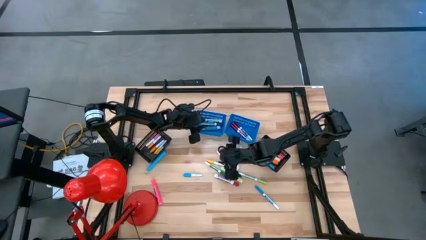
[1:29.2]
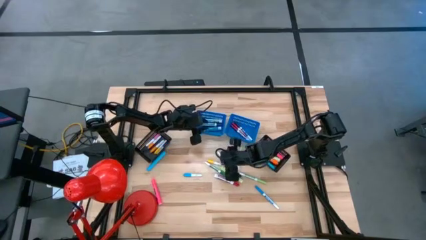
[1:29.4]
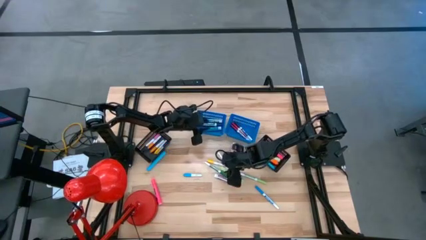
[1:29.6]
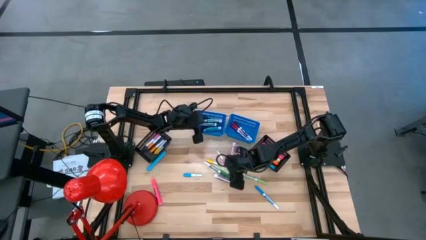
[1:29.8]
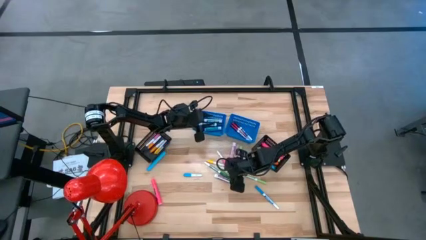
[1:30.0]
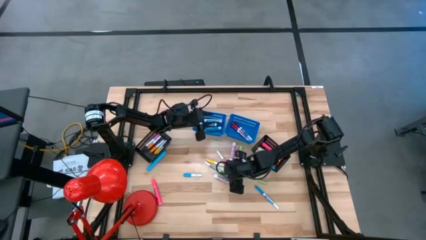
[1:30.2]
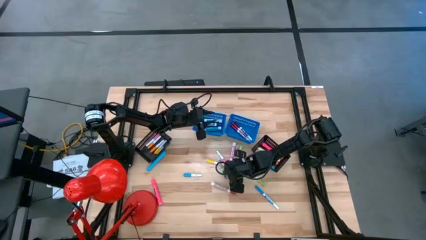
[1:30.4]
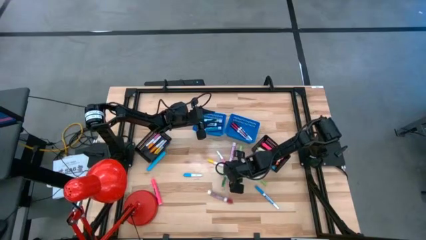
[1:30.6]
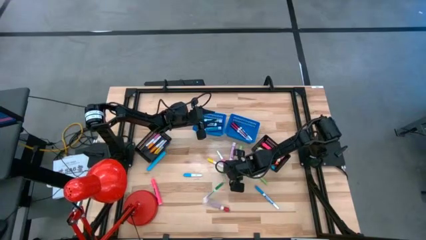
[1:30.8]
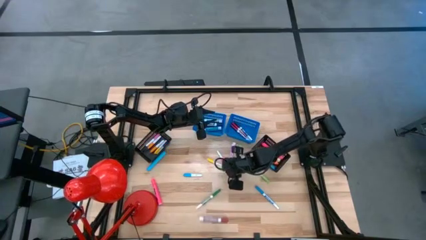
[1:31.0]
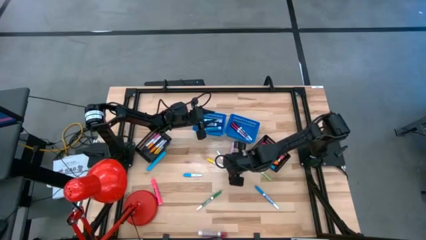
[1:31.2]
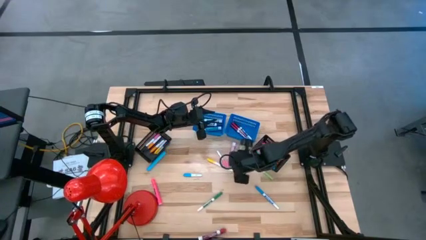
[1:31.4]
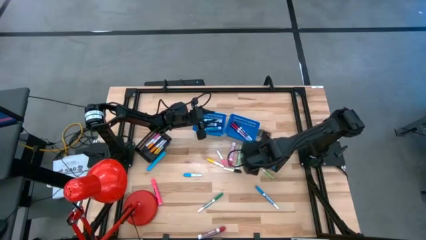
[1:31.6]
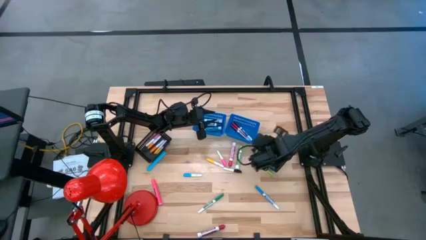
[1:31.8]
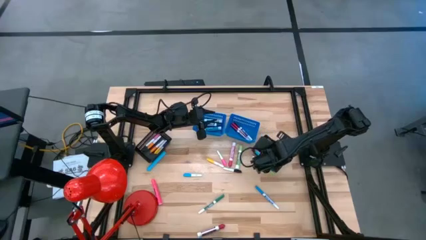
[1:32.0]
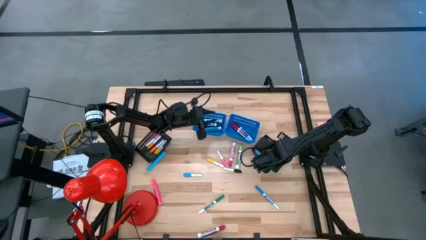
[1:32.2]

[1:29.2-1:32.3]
Task: Pick & Place Markers
Put the light green highlighter marker into the right black bin

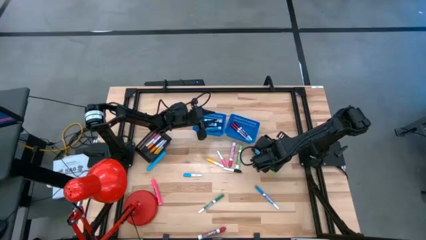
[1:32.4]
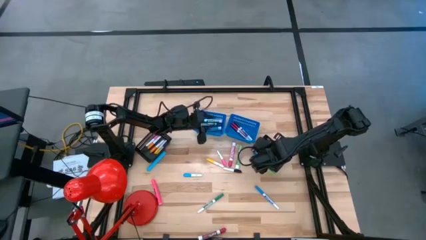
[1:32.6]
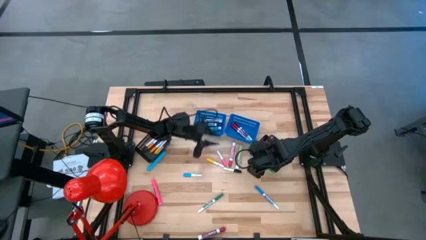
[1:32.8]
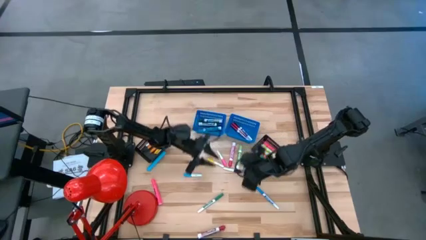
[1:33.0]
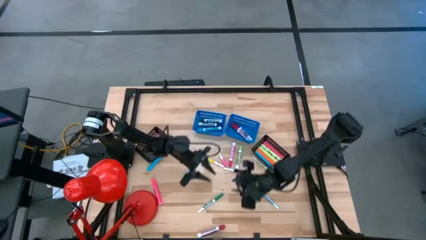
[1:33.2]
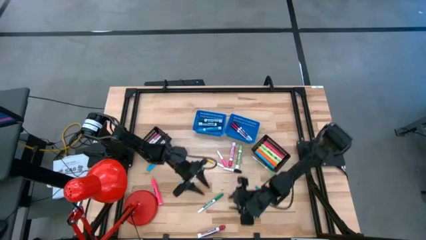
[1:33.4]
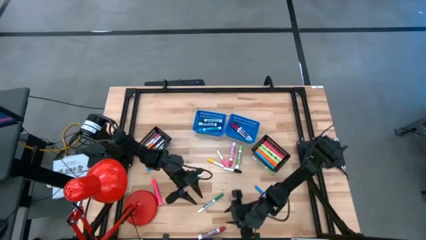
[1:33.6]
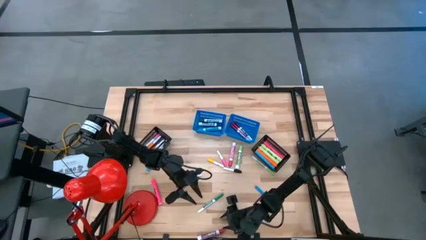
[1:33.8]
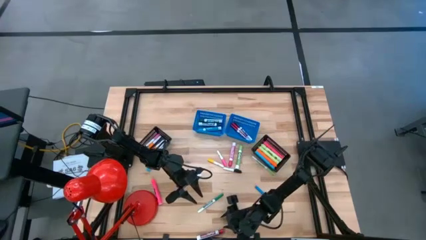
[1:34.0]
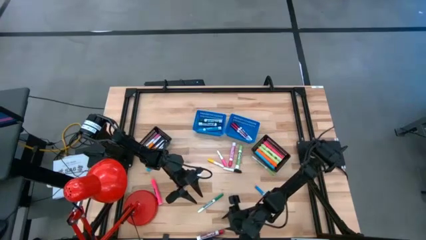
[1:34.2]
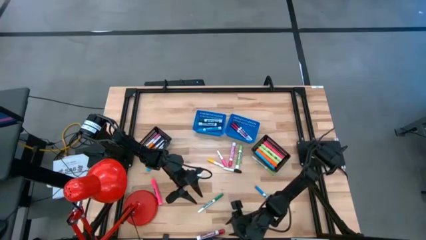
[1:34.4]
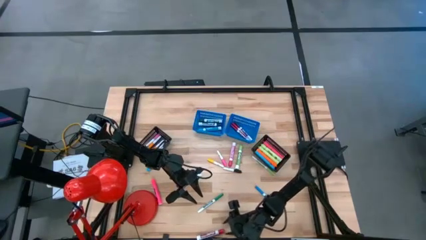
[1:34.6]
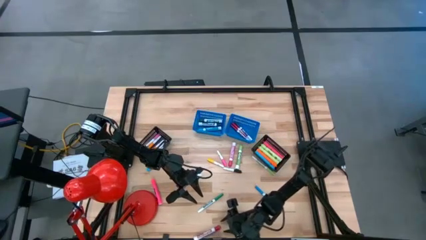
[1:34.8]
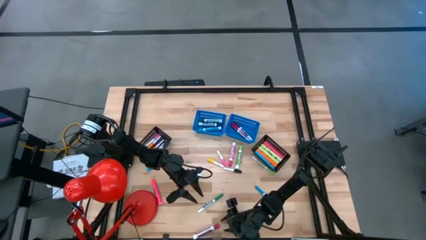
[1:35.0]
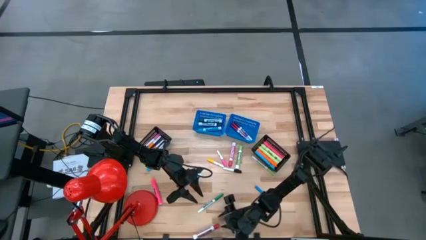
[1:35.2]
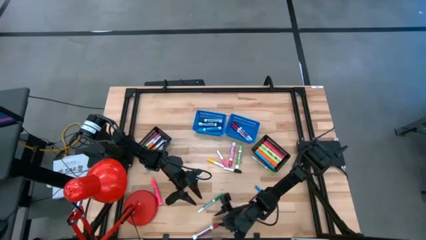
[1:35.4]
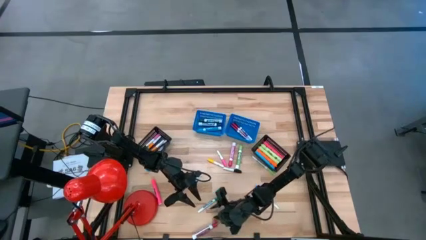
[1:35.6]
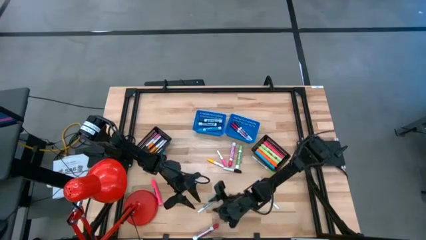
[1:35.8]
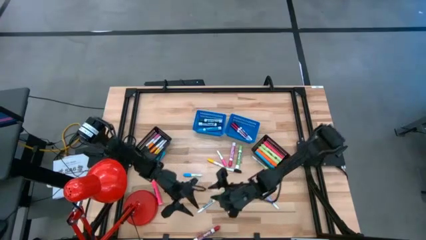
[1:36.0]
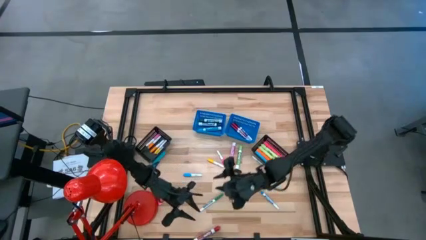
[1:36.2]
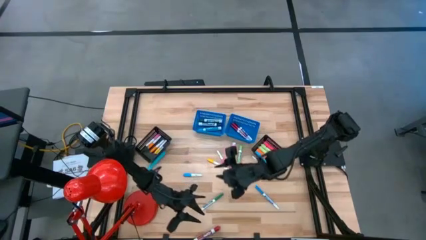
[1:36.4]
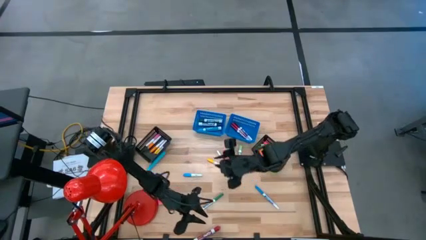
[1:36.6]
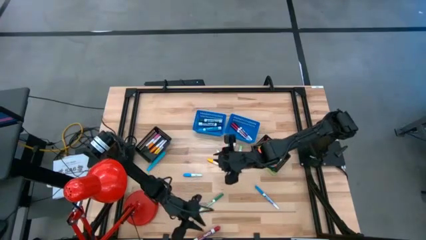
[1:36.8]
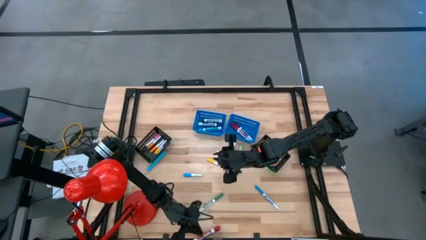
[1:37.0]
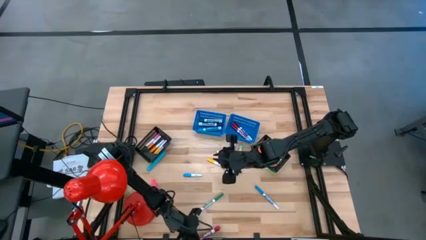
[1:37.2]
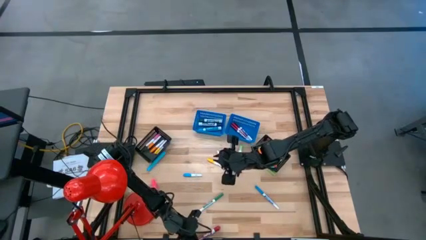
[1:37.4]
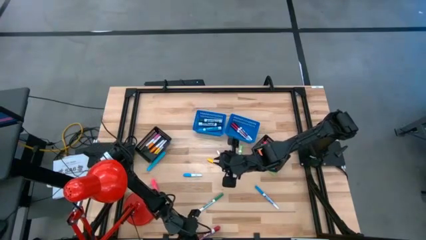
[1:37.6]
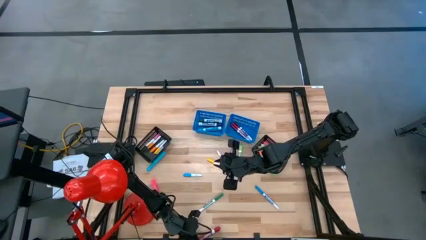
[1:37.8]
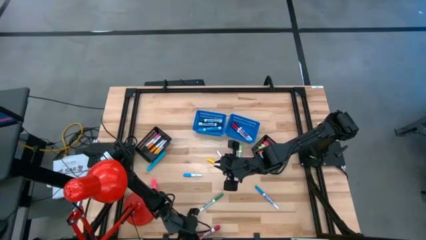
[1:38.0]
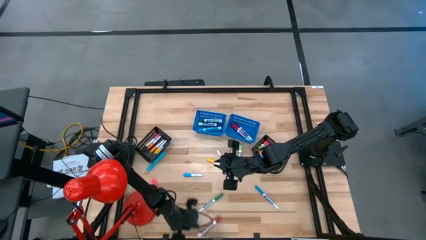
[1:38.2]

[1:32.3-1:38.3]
Put the red solvent marker into the left blue bin

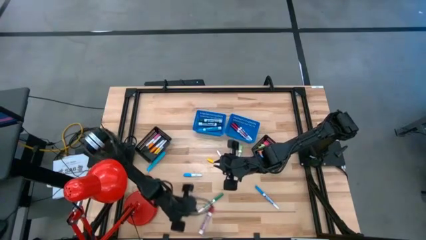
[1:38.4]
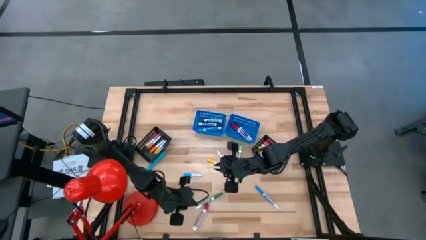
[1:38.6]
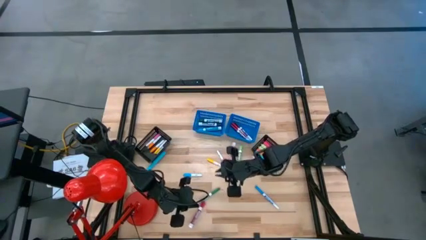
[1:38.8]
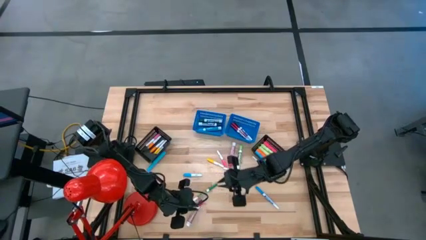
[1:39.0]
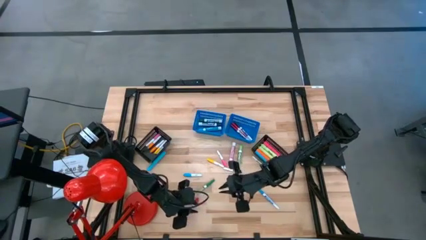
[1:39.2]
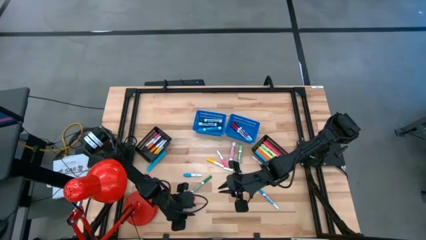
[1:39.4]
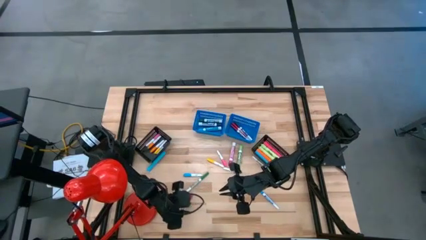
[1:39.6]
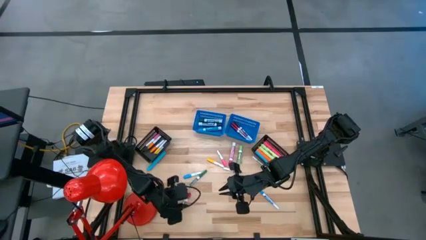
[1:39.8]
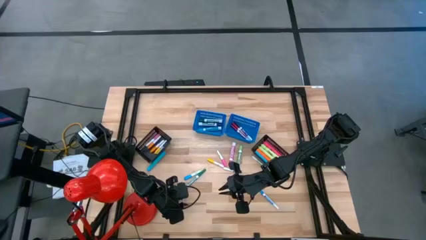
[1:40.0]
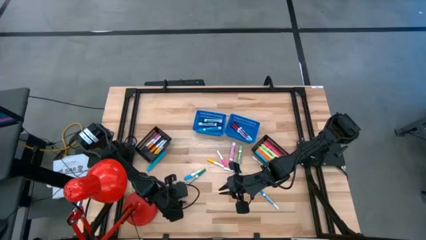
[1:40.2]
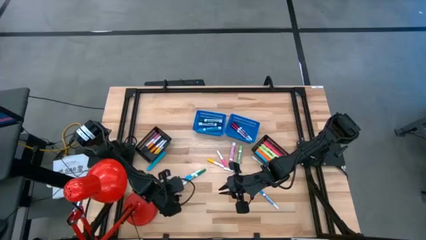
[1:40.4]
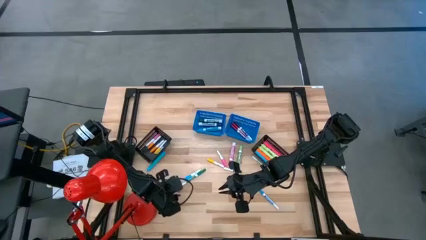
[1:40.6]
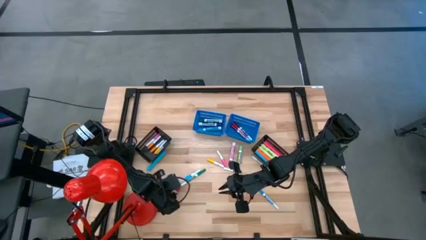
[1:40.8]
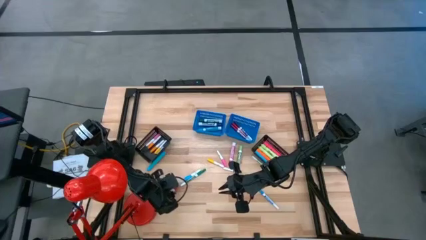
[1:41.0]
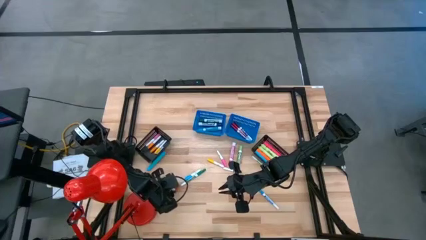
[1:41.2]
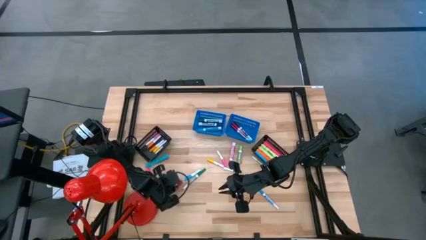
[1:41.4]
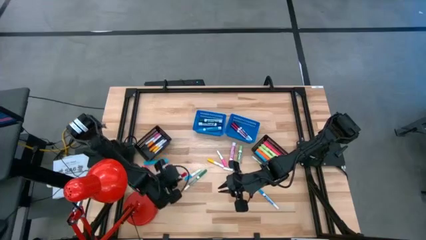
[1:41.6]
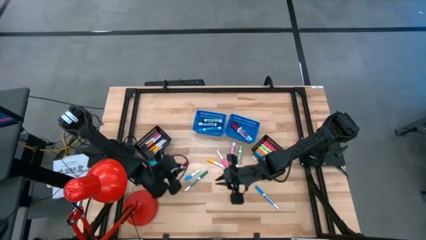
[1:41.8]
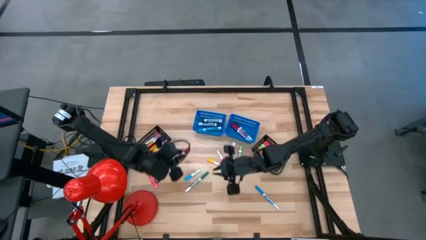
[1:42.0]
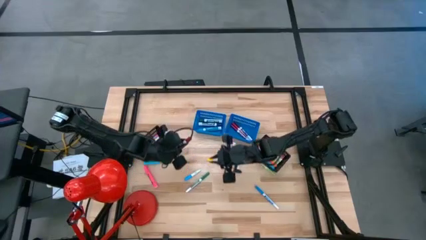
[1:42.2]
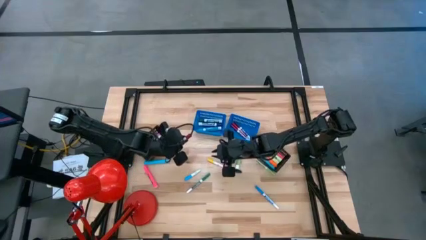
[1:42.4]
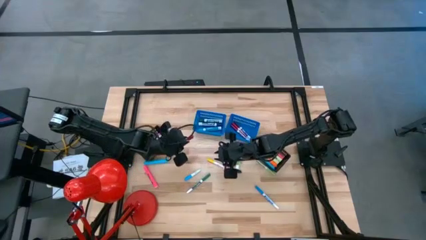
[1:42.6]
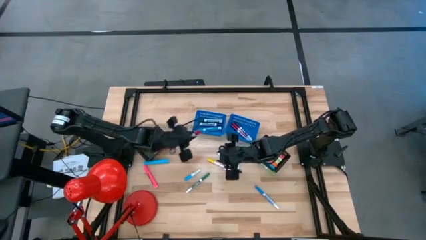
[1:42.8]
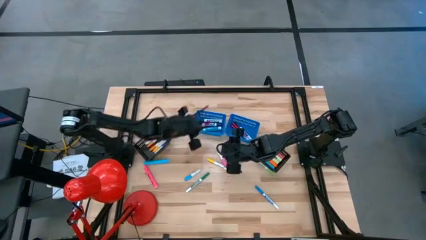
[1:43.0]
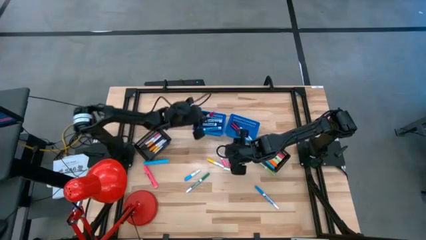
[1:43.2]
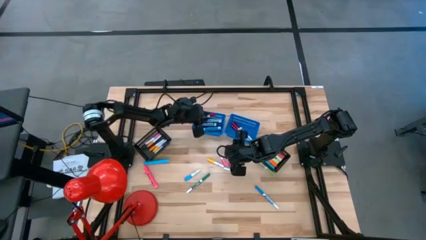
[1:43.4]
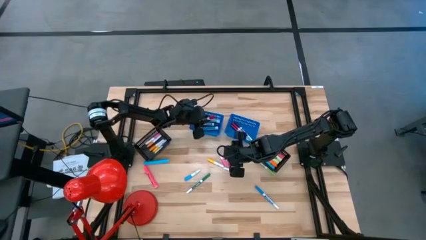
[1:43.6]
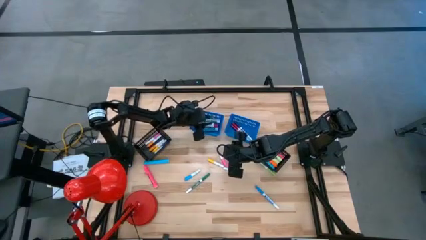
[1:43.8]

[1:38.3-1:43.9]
Put the red solvent marker into the left blue bin

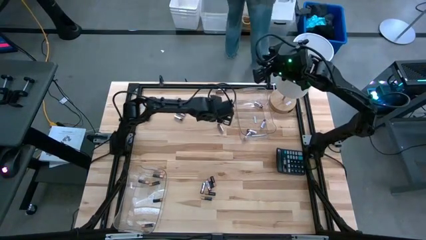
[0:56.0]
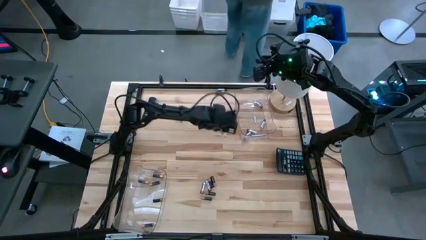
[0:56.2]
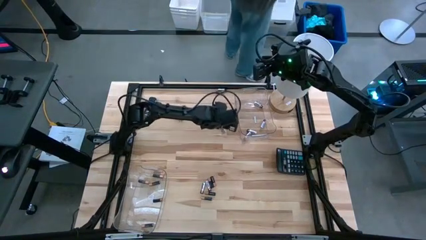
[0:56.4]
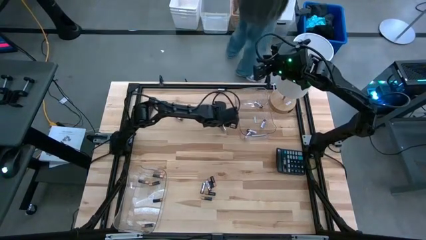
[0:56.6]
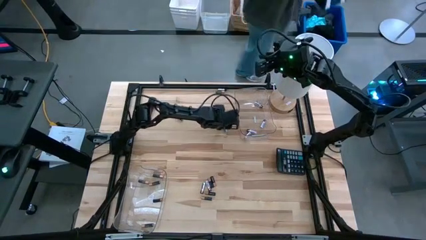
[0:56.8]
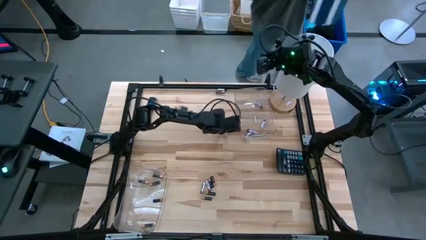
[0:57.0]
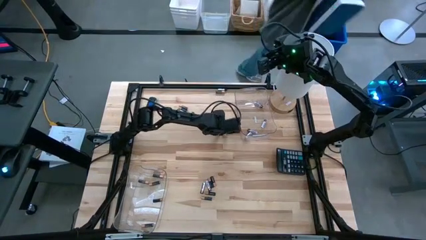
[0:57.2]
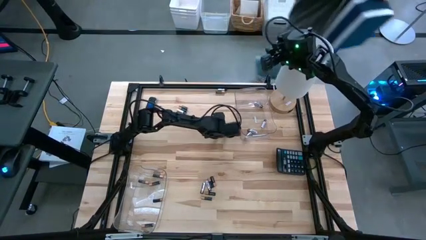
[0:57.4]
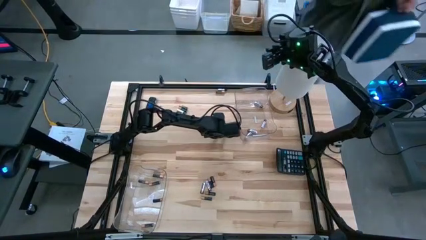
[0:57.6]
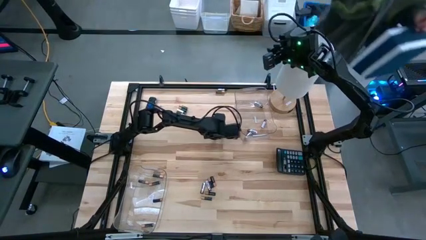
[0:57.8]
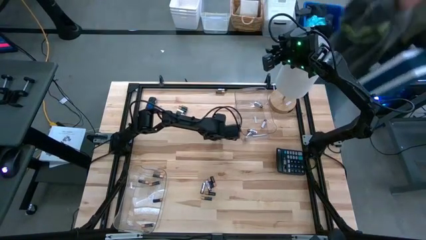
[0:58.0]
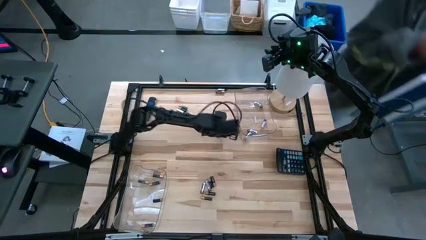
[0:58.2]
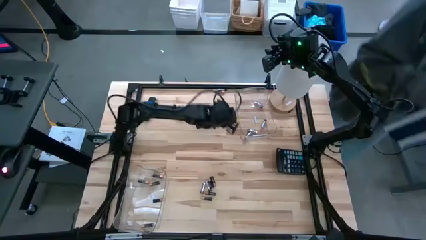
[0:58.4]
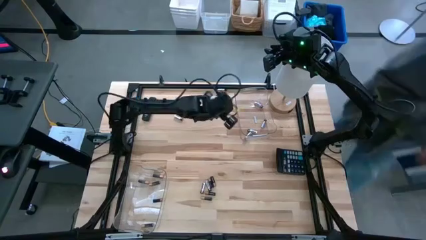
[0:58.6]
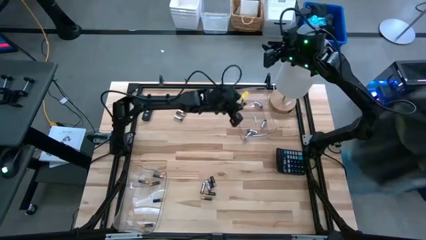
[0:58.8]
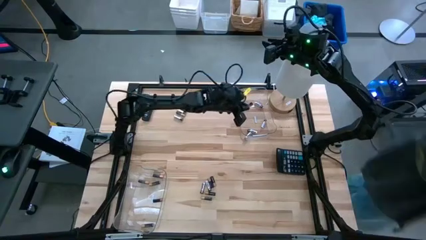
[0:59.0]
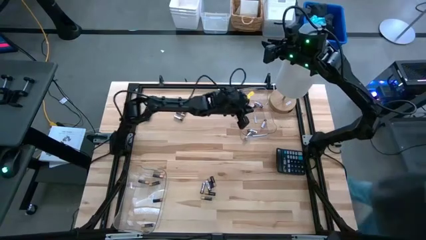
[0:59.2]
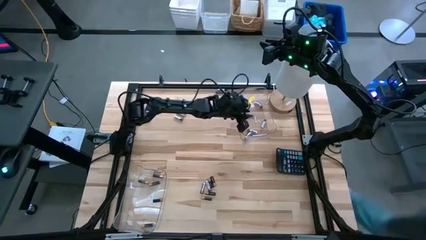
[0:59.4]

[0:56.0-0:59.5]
Task: Sort batteries
Put the silver battery into the right transparent bin
